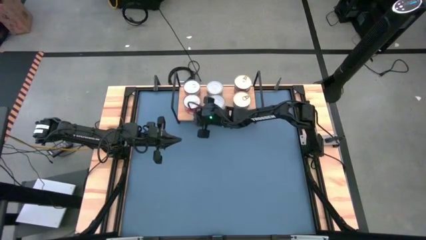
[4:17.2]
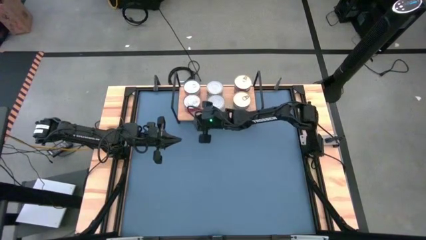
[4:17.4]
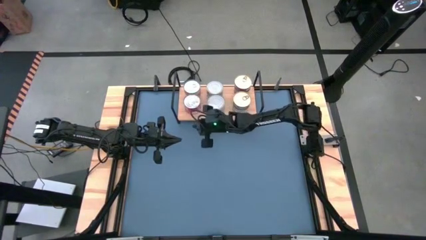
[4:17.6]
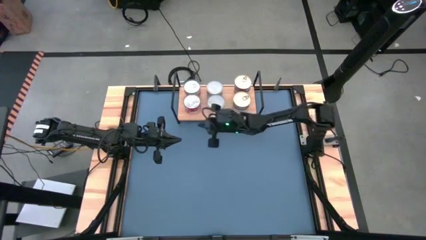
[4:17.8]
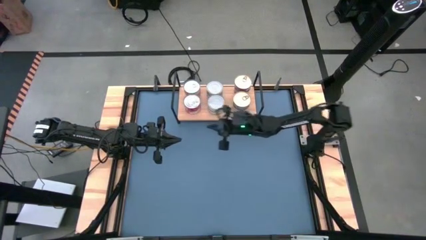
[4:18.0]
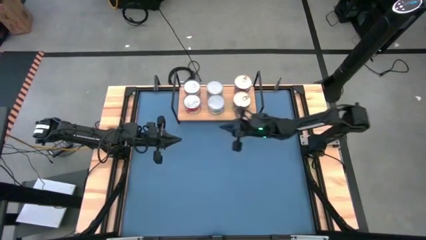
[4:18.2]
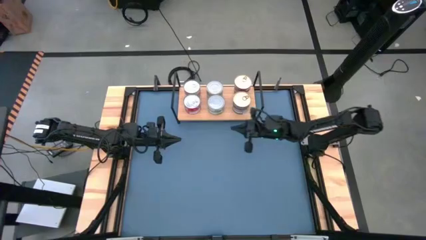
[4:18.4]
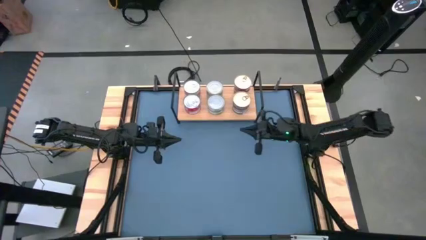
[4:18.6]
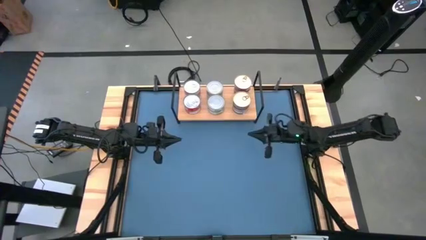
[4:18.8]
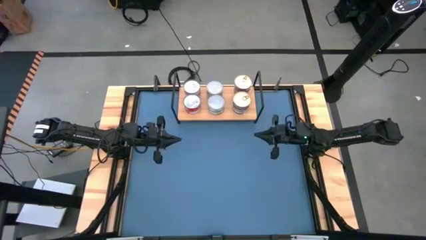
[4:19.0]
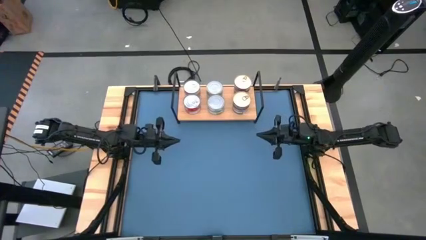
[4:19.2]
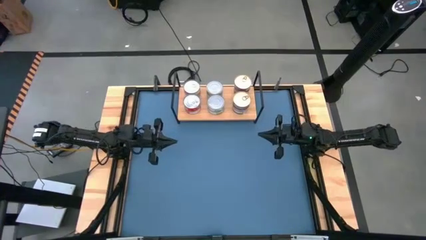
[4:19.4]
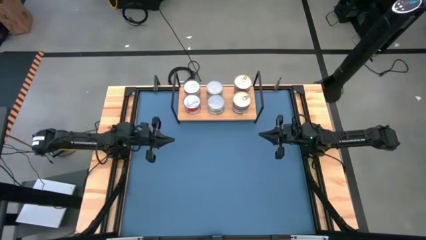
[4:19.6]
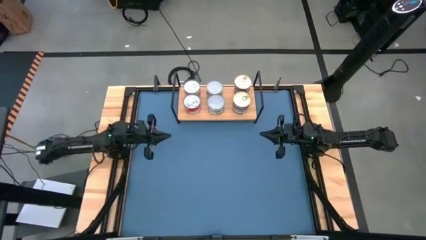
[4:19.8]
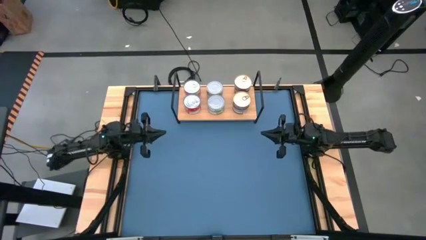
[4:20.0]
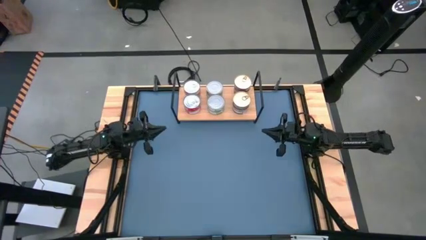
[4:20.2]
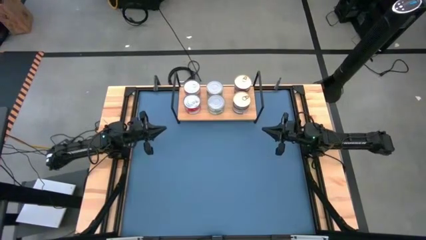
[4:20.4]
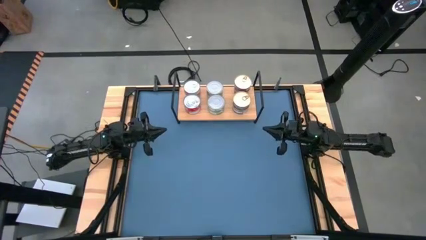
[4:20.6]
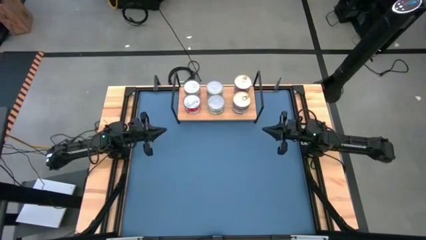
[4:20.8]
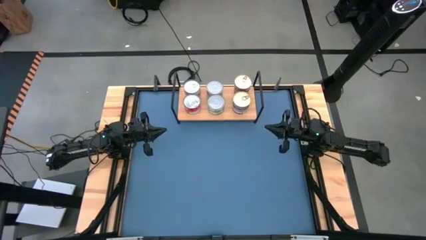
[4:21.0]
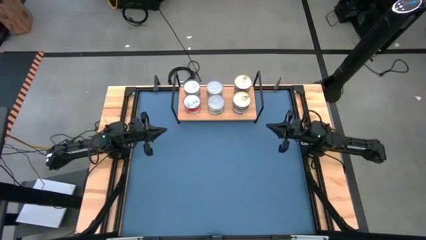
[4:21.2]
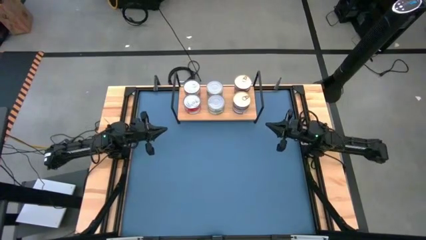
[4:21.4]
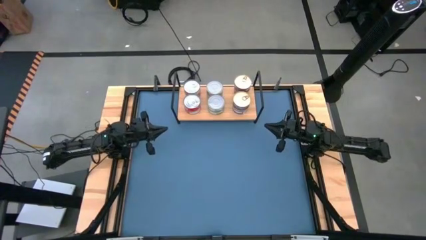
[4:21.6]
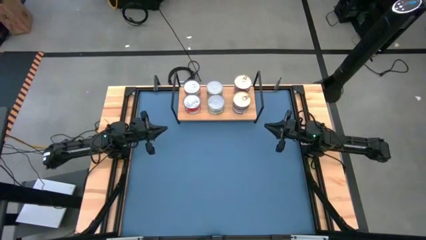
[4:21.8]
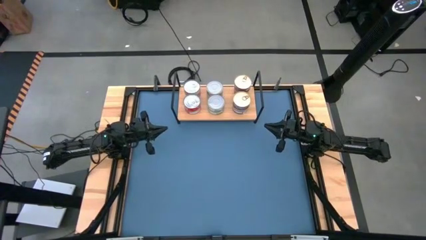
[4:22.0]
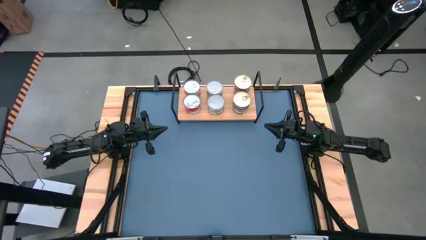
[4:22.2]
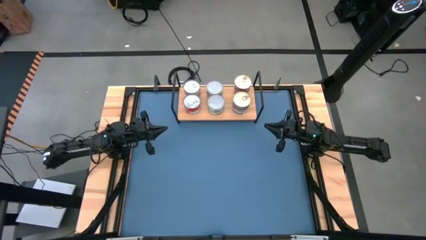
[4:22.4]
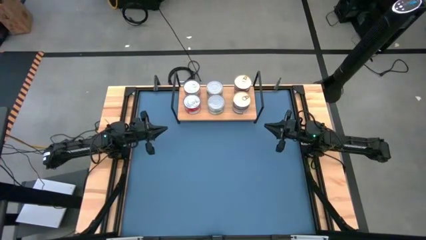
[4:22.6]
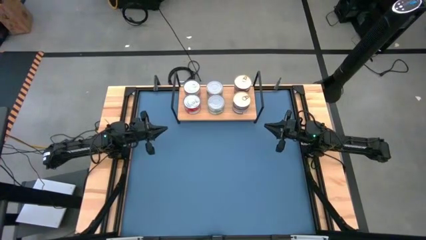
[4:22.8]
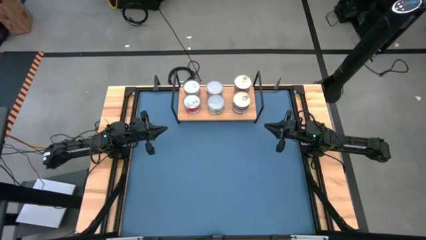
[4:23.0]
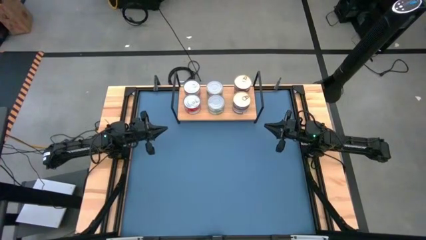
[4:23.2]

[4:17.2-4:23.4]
Task: Stack canned seafood by type on shelf
Return to Home Position

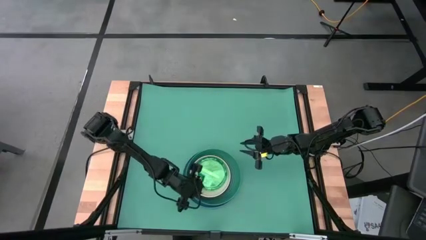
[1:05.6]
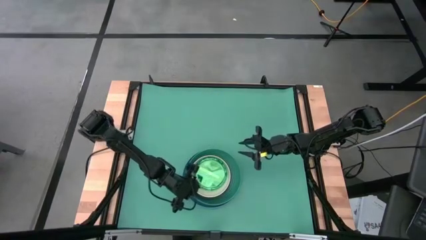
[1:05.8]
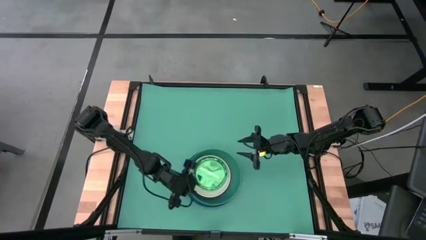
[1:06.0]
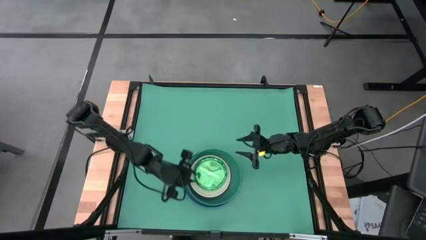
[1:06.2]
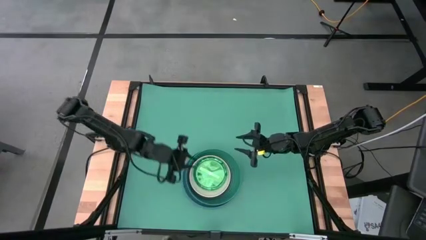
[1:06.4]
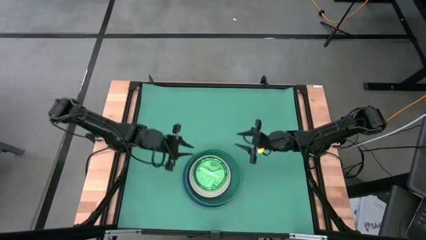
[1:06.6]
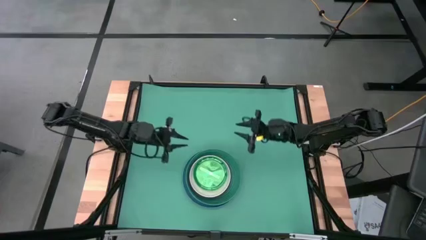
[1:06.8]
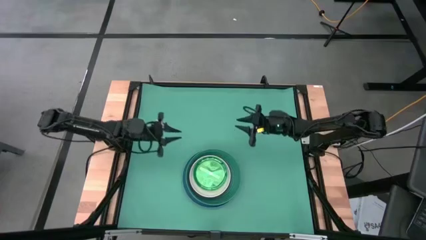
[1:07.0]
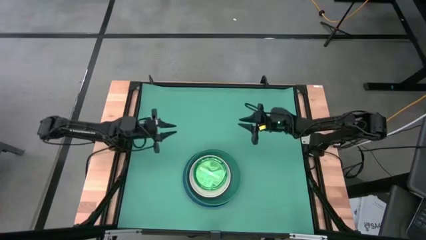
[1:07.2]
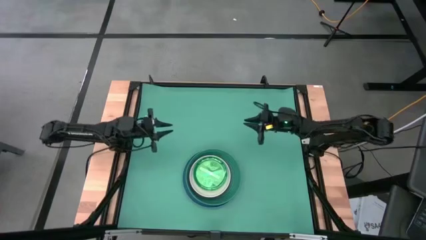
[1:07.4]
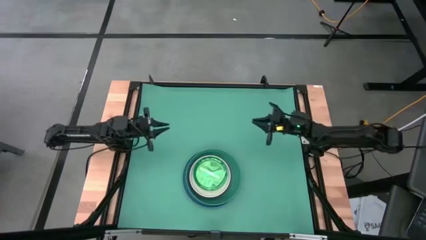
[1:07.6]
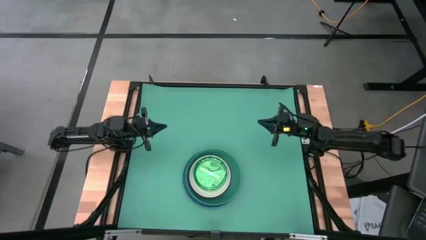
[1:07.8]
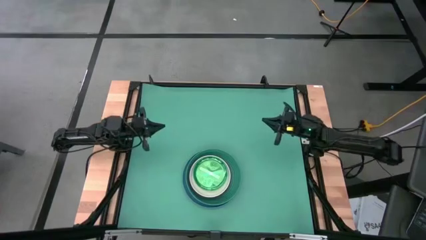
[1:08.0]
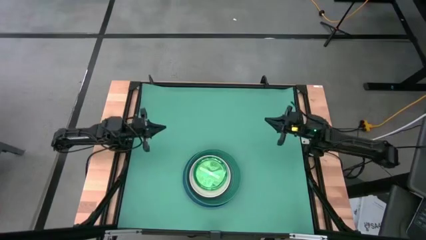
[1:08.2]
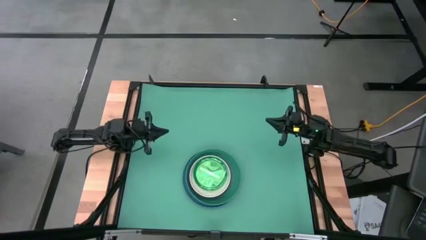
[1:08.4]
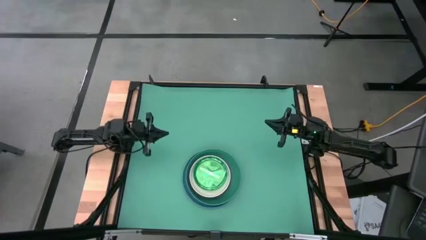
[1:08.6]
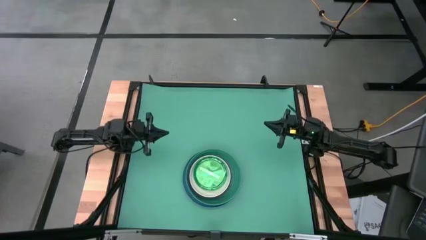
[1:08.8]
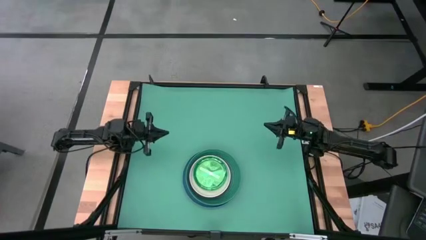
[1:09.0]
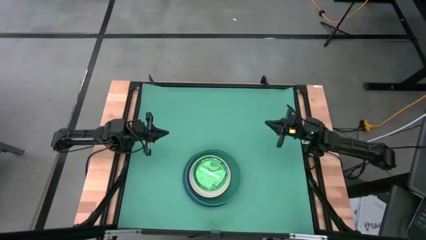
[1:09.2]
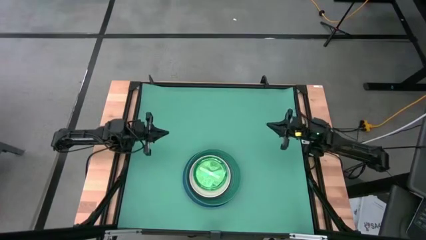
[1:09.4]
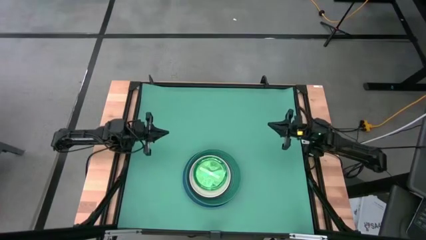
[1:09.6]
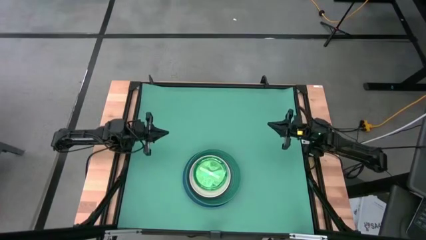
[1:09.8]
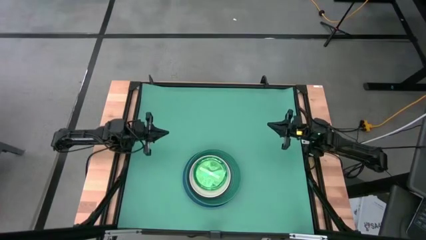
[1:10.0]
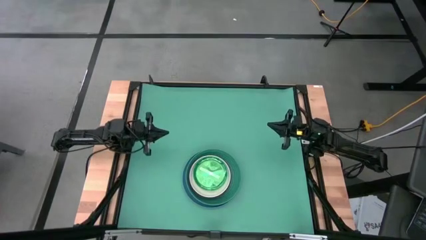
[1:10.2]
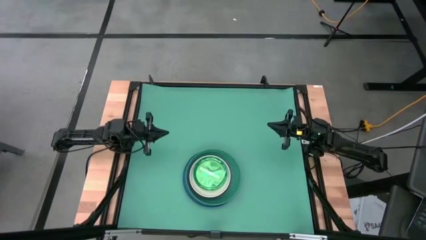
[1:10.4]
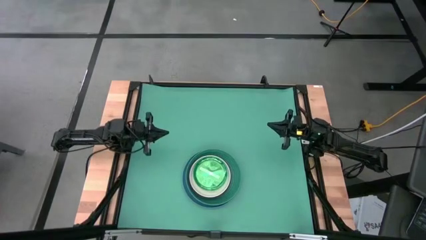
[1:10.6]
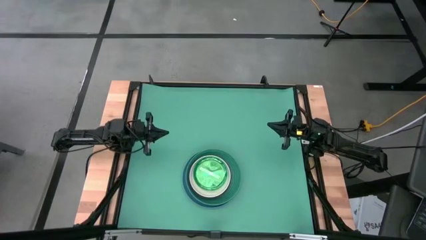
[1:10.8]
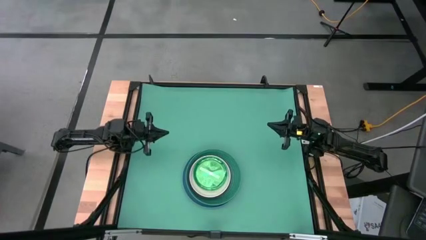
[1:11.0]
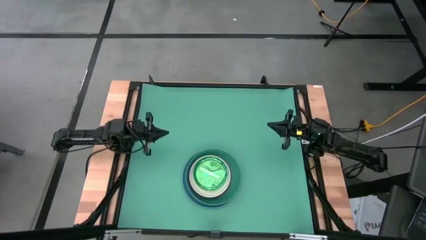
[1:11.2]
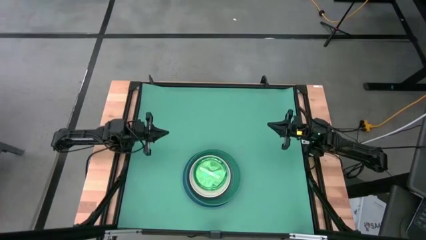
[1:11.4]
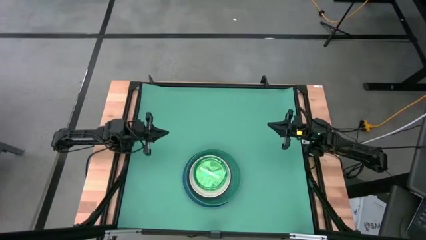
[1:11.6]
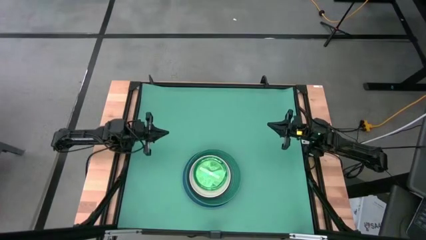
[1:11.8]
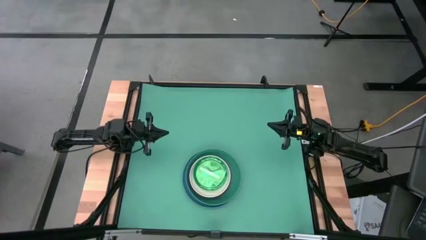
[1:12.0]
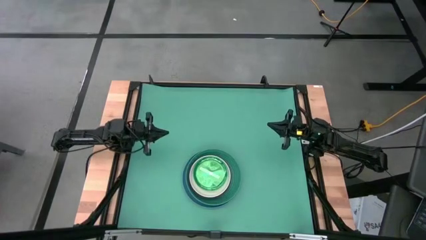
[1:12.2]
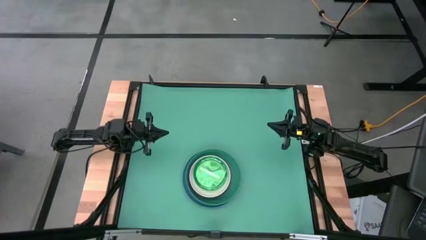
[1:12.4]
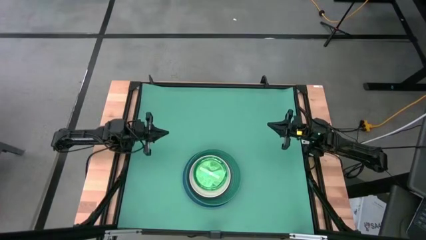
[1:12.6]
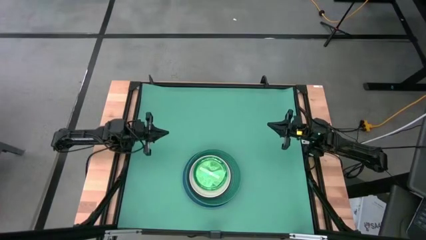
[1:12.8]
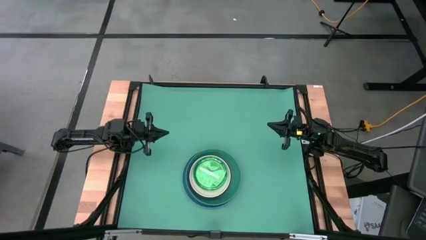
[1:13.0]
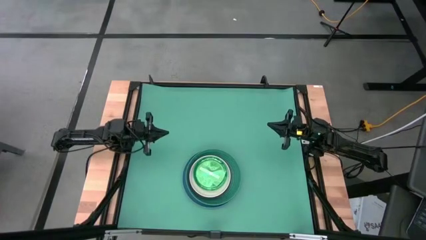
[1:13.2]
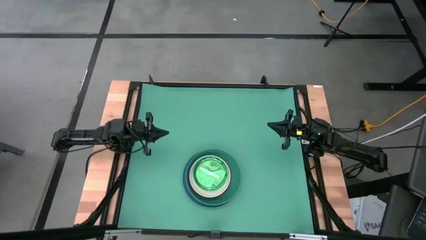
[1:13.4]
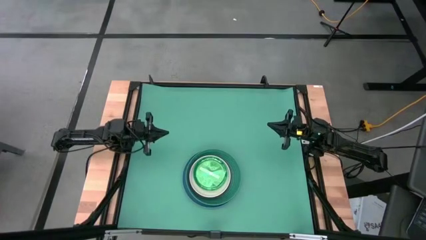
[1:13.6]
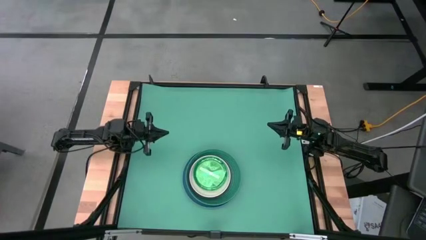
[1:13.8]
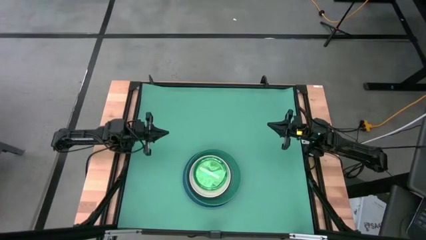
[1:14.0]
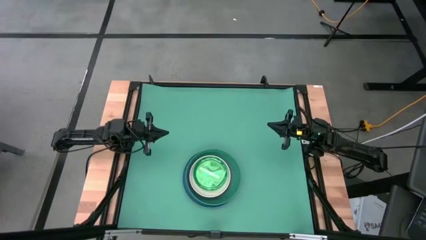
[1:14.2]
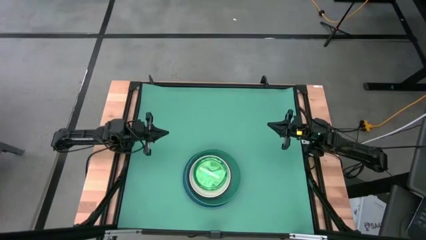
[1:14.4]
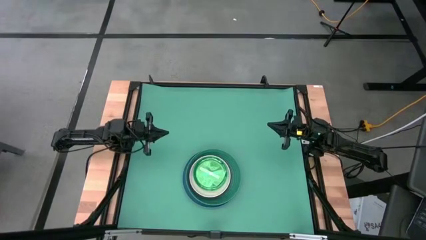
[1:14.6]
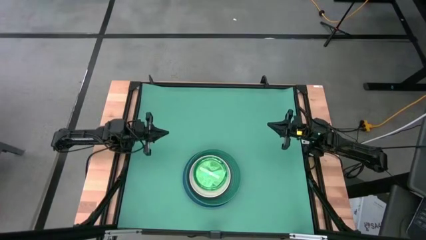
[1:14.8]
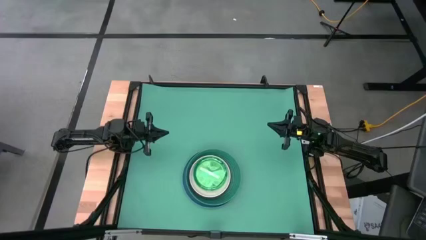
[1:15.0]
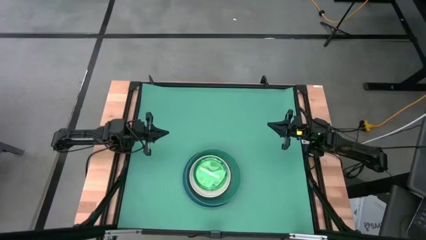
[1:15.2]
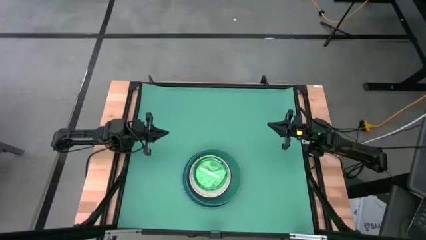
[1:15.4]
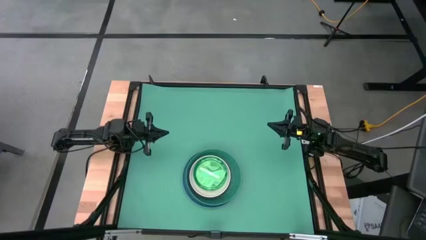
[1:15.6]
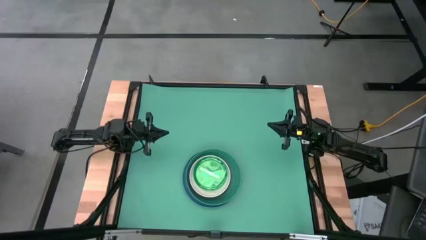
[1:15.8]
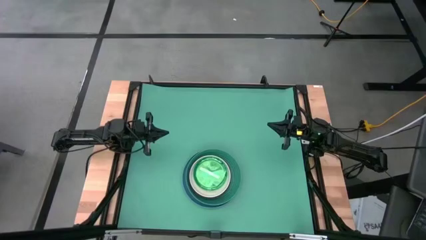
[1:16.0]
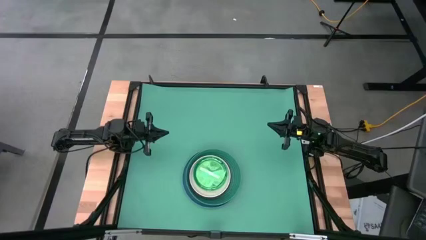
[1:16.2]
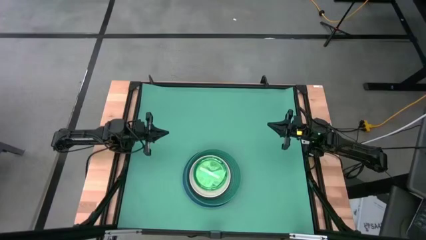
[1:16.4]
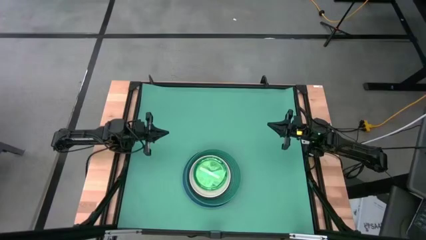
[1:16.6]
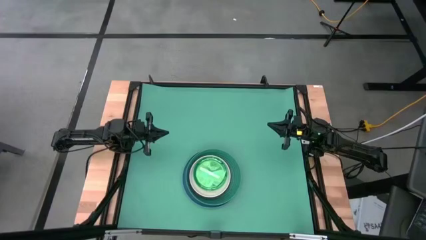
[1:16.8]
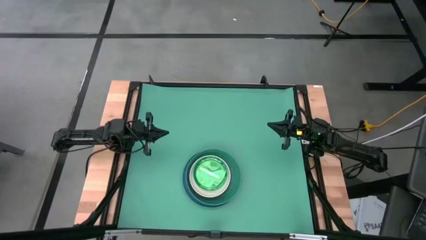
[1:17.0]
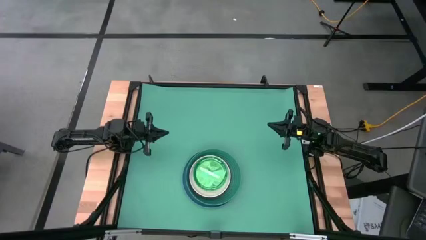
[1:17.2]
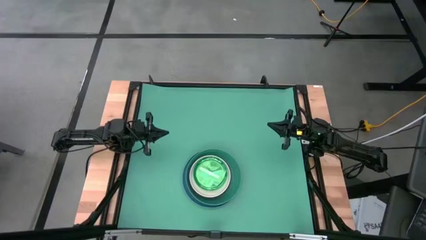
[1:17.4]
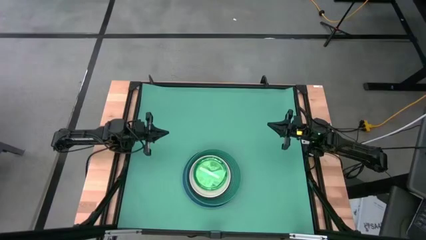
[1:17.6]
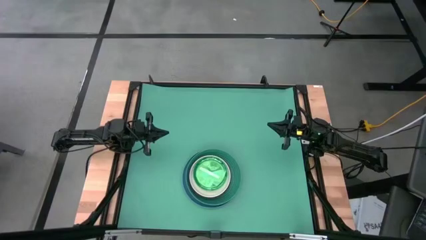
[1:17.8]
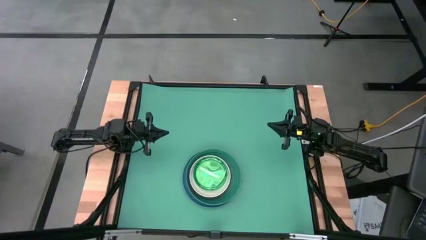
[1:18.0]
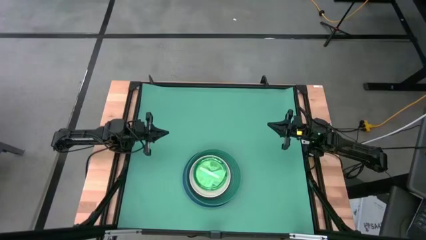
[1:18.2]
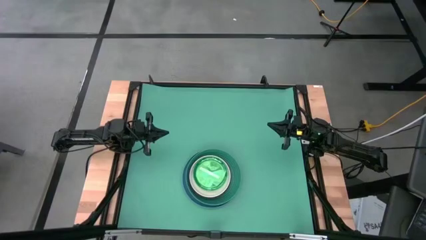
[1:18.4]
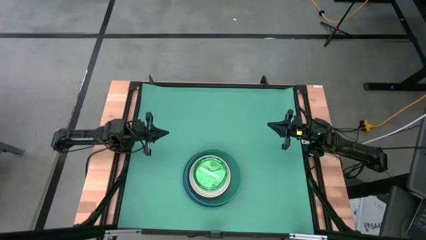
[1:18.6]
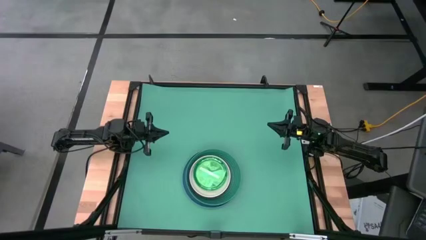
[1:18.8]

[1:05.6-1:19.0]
Task: Stack plastic plates
Return to Home Position
